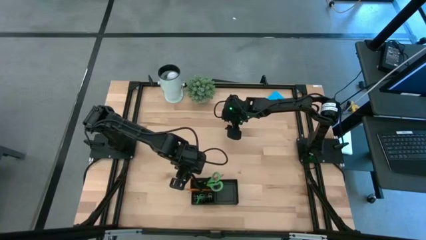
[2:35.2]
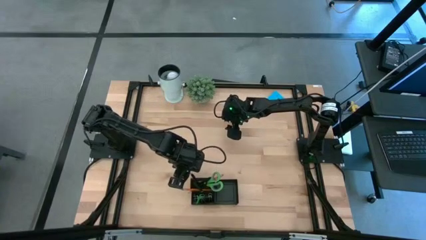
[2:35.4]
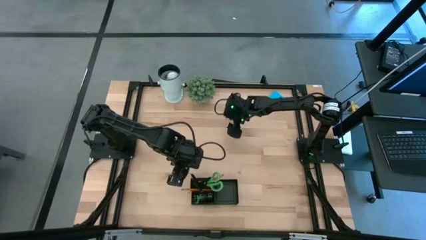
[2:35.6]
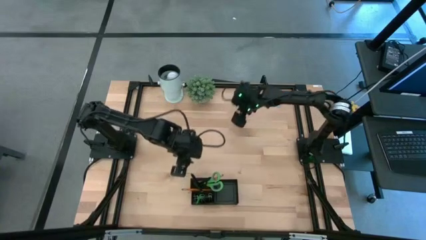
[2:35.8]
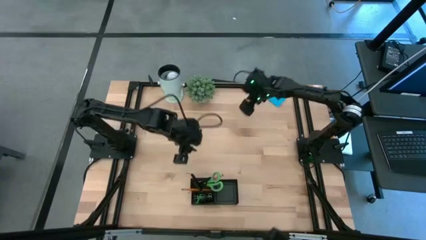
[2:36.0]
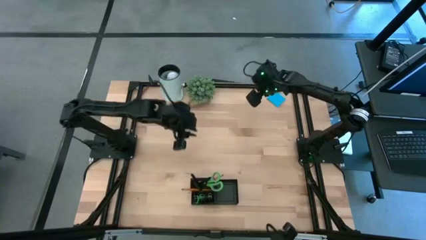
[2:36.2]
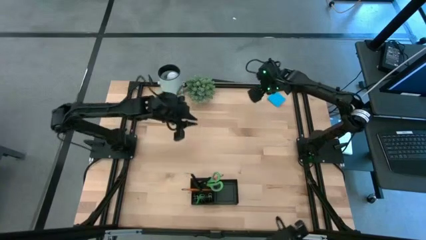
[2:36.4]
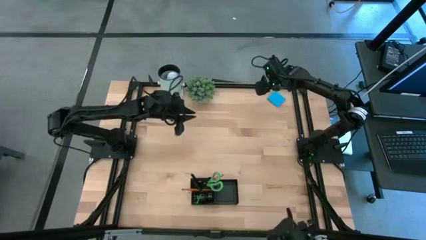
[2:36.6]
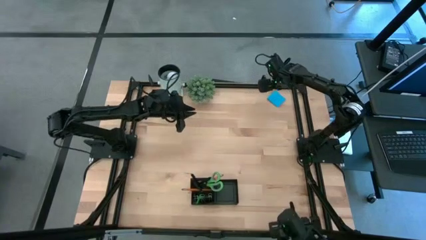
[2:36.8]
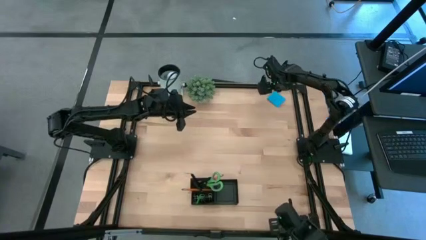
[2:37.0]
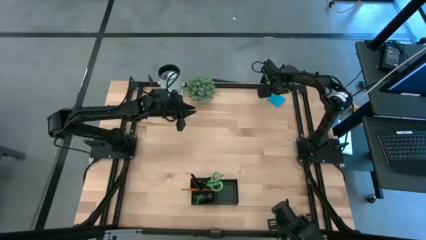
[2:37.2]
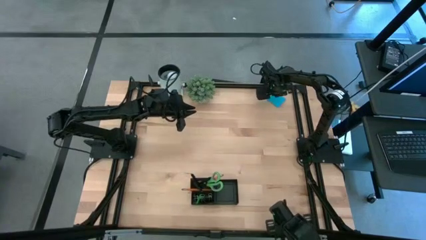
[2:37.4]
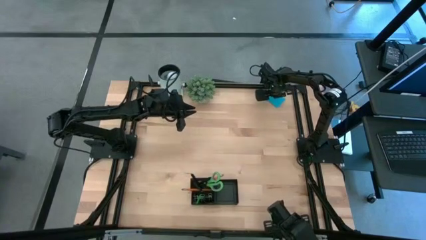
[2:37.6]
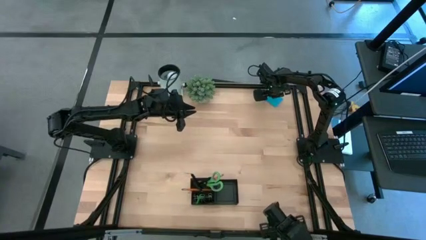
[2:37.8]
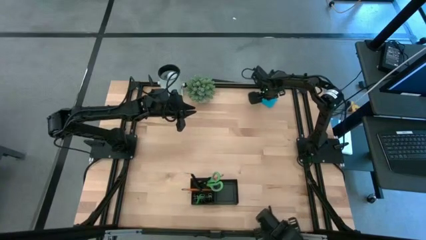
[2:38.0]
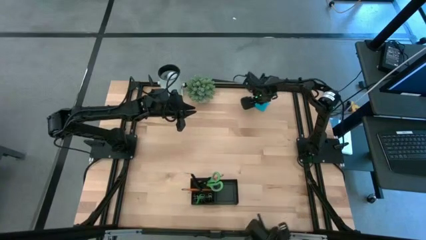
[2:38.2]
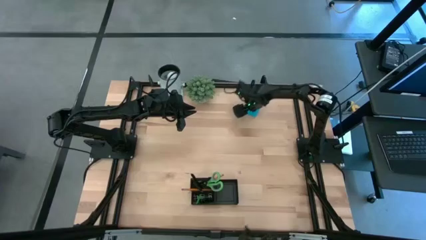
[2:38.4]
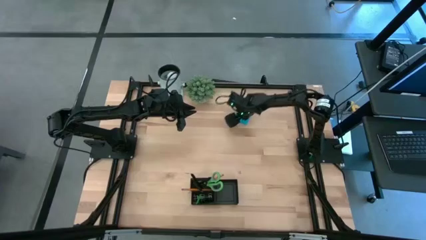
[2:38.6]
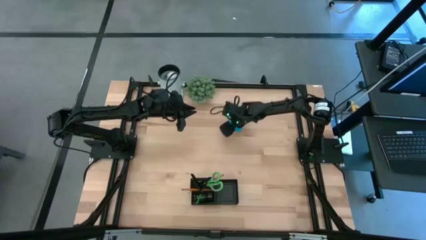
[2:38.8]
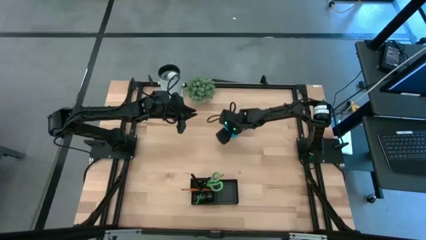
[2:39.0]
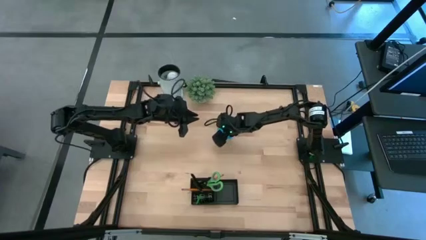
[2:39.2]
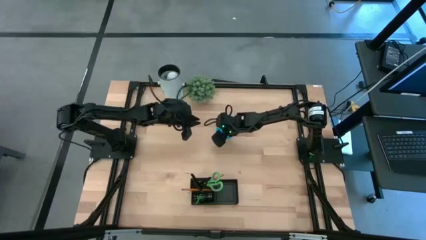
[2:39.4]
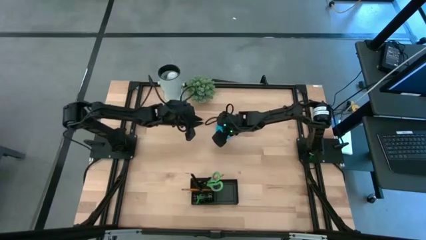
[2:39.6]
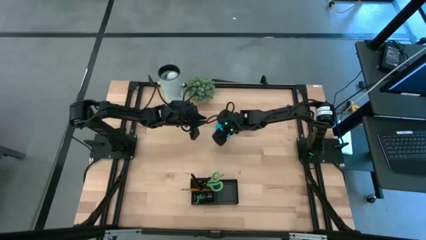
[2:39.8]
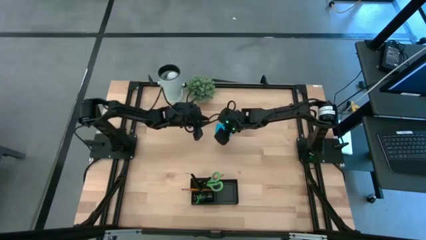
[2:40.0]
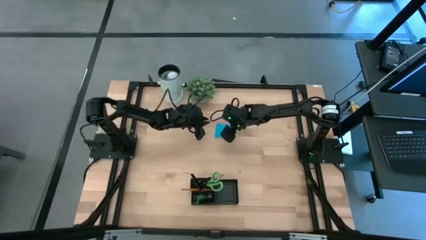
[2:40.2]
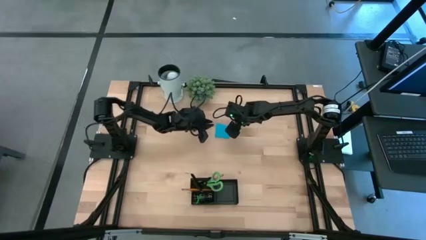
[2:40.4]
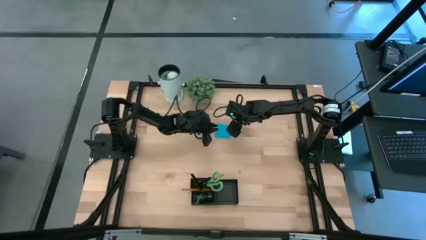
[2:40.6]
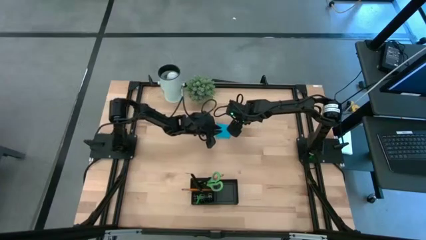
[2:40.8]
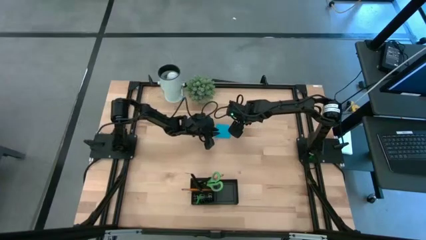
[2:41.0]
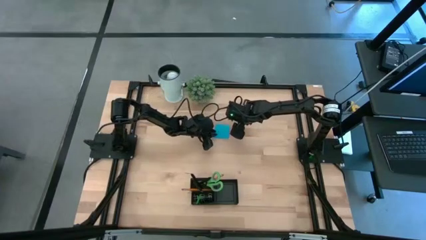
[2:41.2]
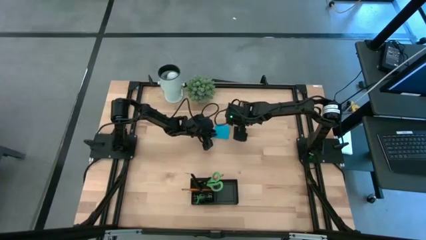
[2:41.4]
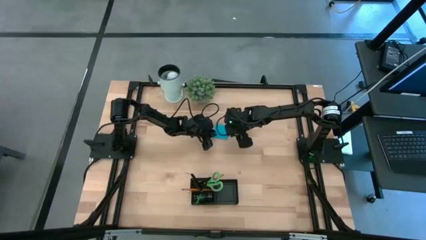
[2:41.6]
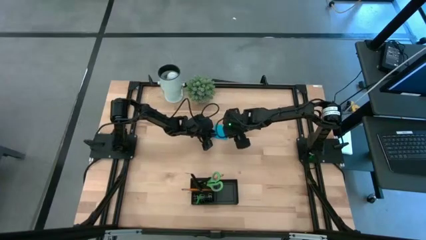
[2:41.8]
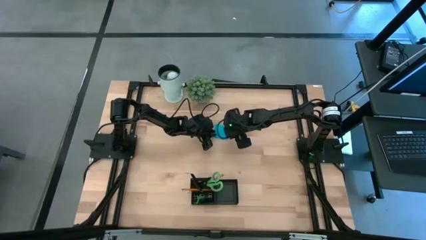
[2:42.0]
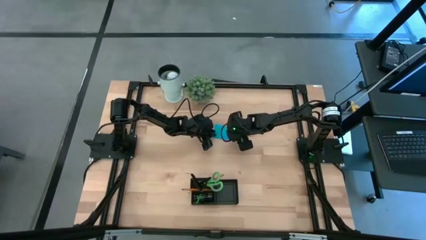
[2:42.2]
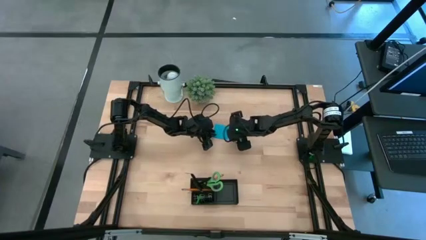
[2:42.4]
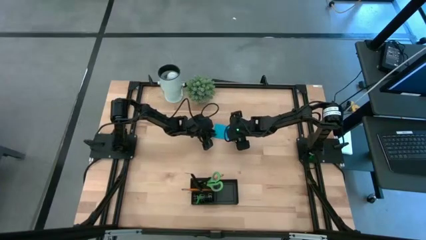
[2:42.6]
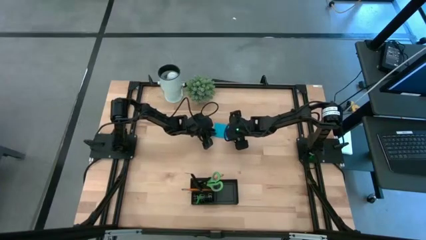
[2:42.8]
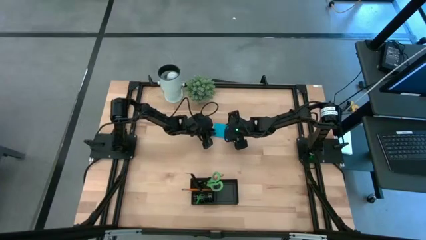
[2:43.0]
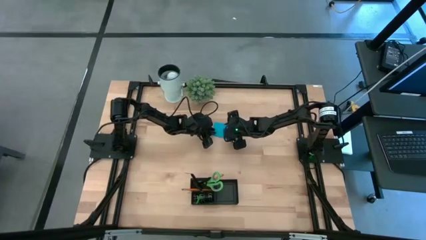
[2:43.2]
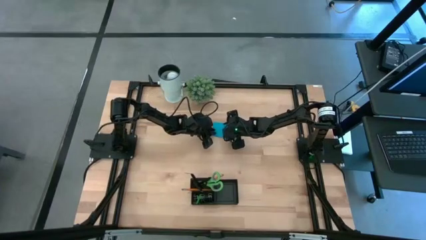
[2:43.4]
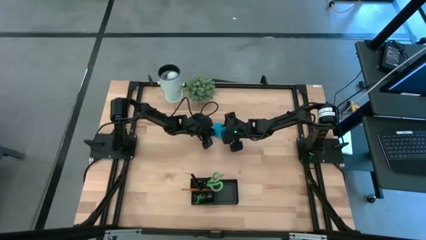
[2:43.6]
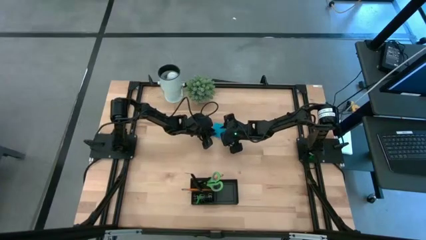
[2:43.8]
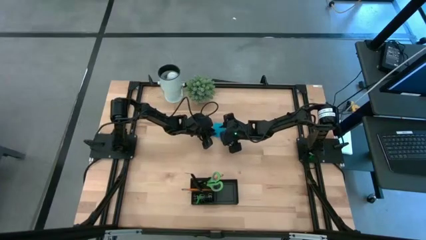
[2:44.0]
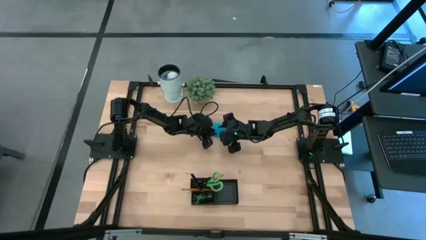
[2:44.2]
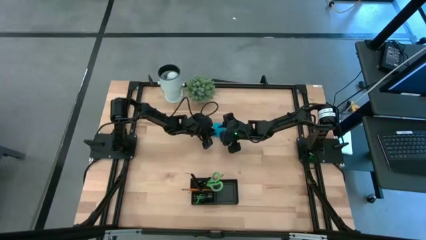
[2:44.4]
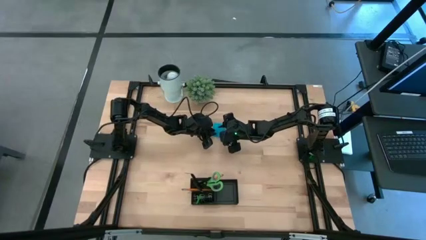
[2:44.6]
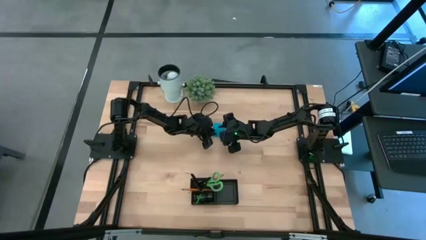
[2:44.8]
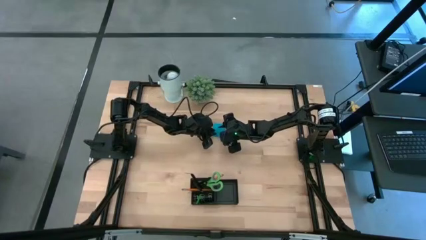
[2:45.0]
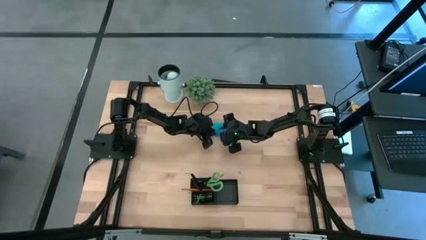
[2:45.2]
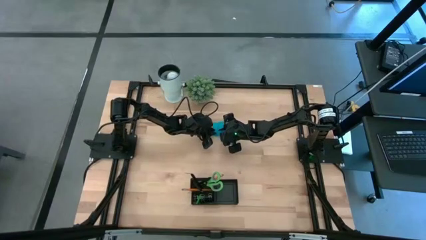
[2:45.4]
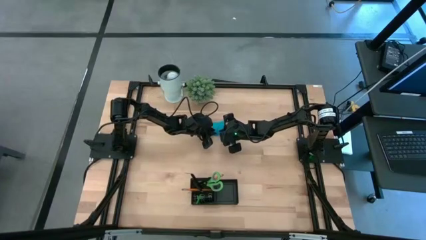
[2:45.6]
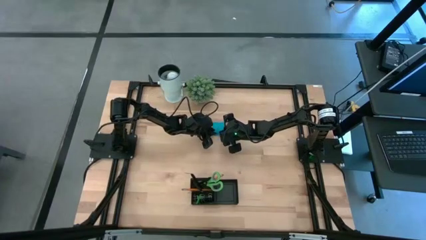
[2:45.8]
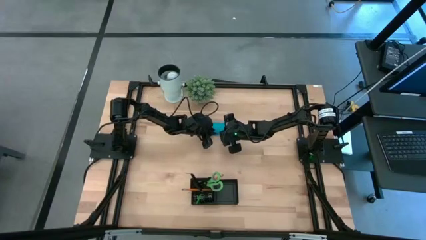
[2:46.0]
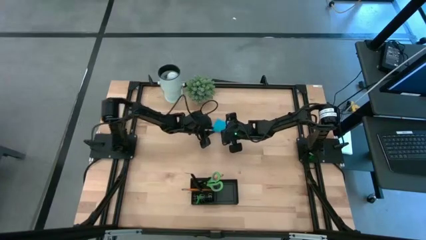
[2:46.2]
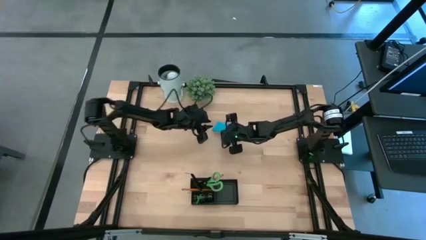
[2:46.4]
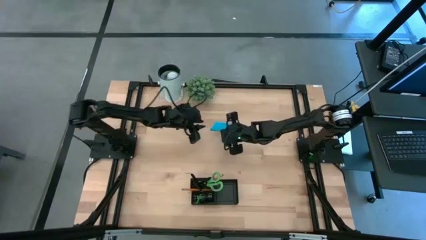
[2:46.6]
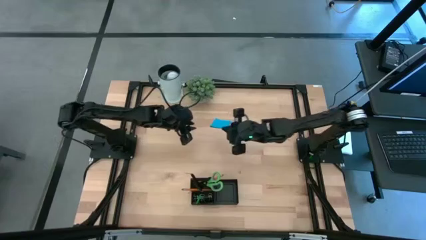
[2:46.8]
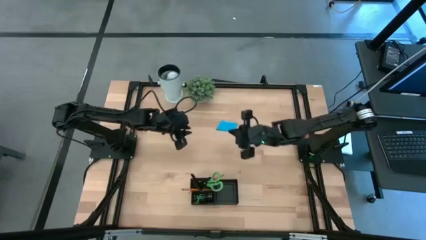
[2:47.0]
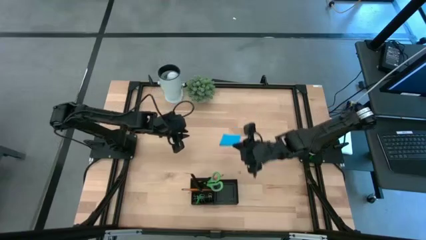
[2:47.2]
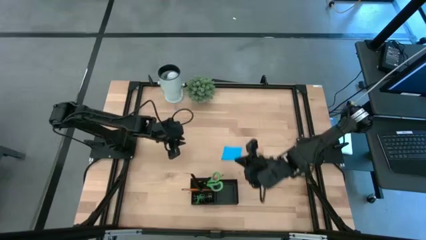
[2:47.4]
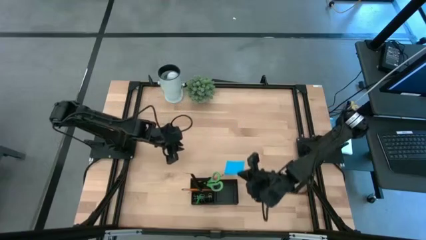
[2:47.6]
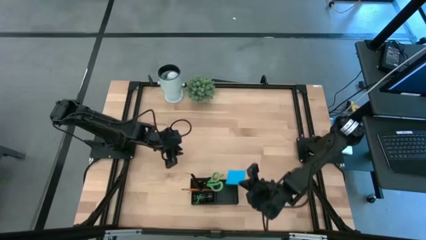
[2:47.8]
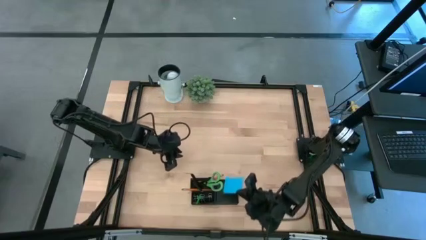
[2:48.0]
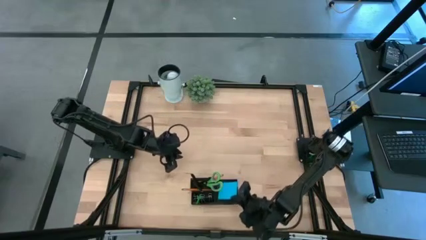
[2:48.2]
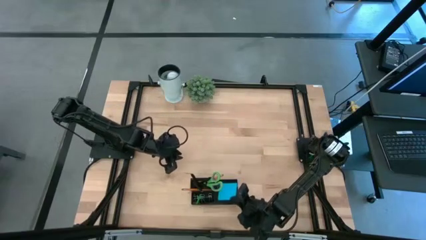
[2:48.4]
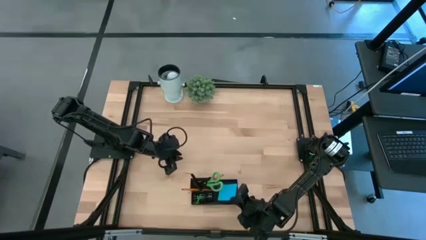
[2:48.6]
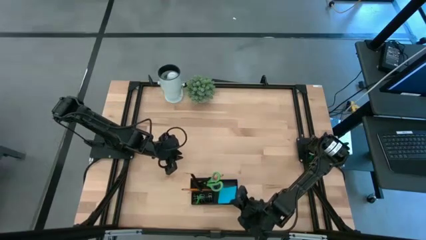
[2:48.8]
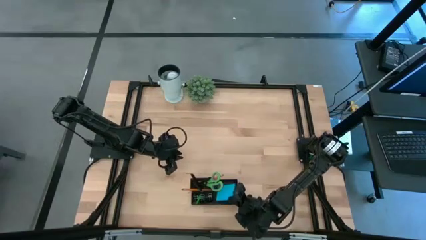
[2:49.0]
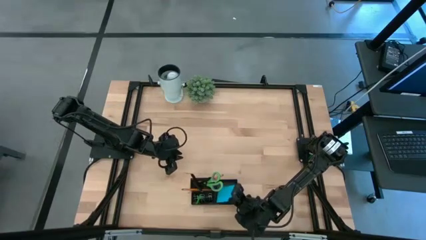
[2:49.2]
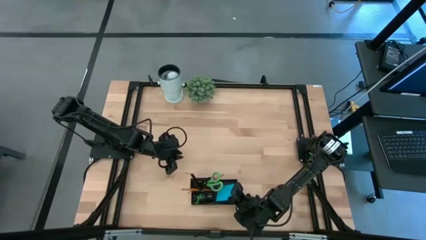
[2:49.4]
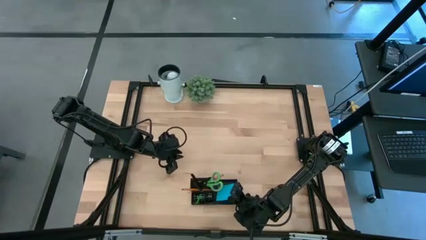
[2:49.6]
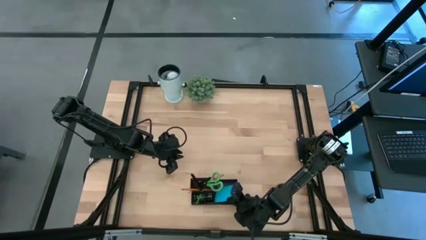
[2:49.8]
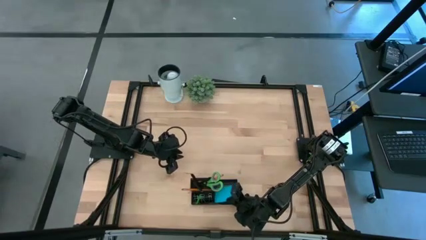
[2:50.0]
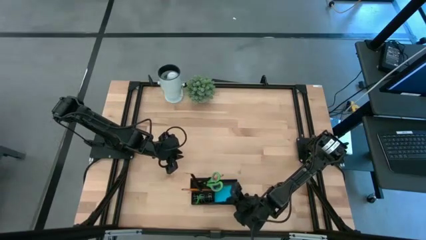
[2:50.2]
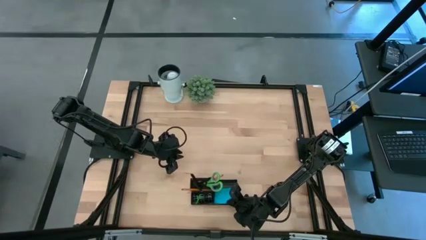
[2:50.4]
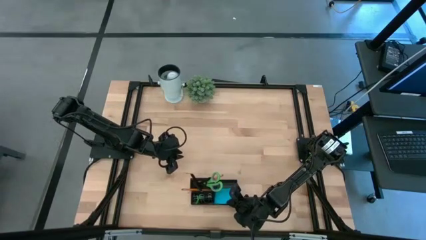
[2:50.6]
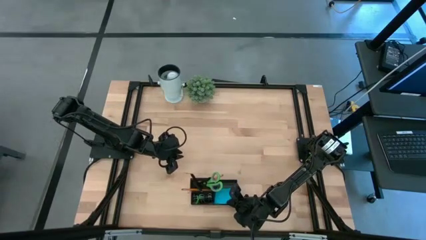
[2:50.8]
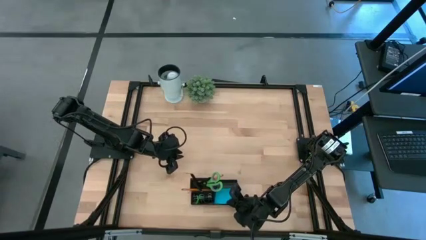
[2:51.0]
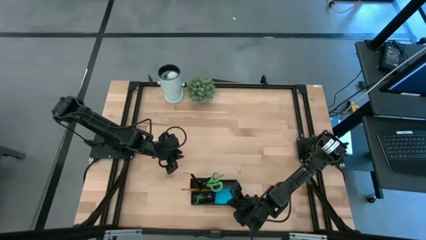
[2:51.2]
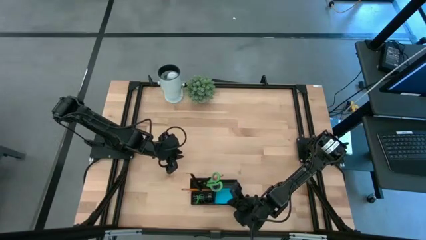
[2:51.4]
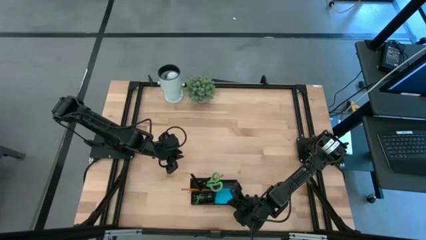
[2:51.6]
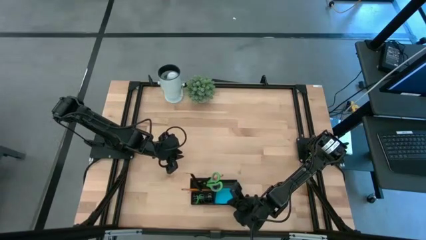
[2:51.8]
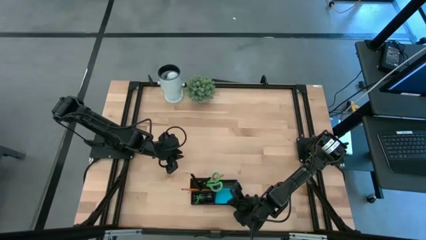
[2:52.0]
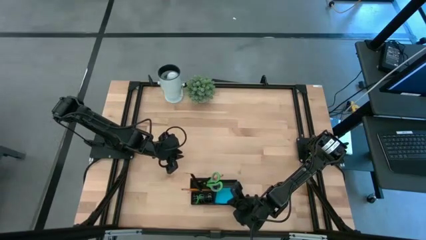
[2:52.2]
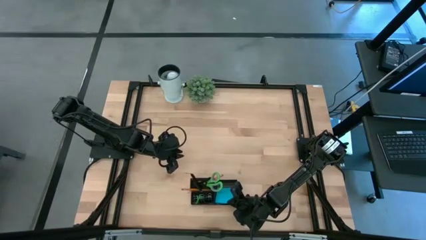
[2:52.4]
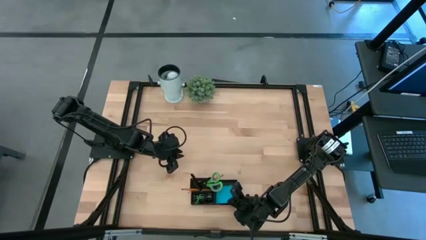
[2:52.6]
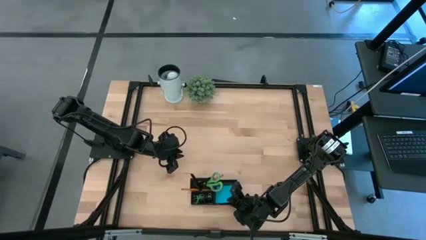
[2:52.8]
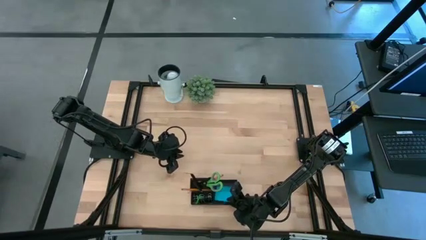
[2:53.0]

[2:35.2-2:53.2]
Task: Pick and place office supplies into organizer
Put the blue sticky note into the black desk organizer
